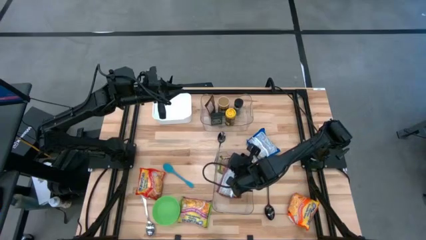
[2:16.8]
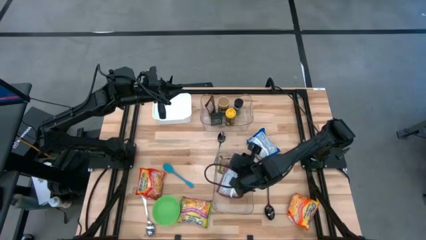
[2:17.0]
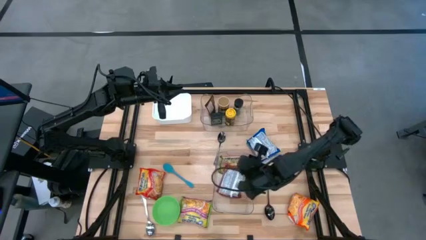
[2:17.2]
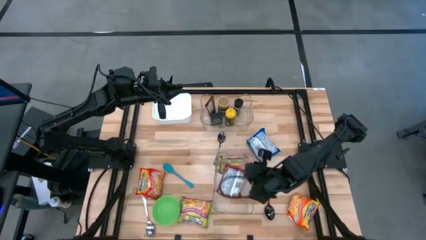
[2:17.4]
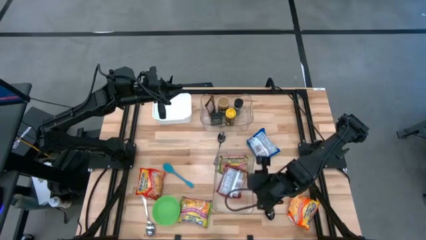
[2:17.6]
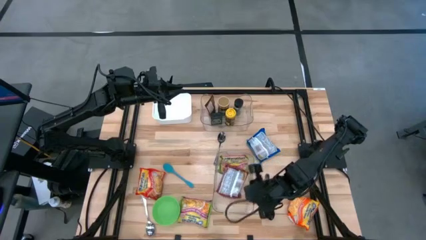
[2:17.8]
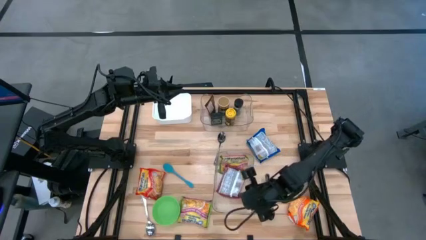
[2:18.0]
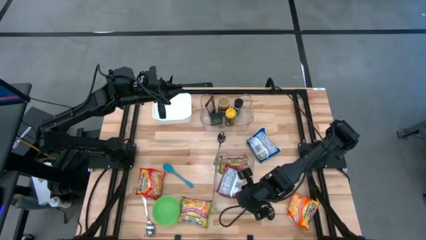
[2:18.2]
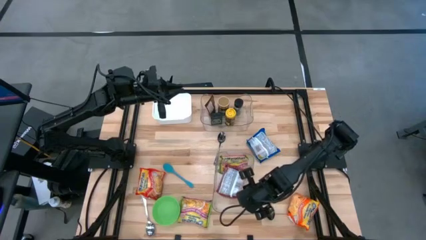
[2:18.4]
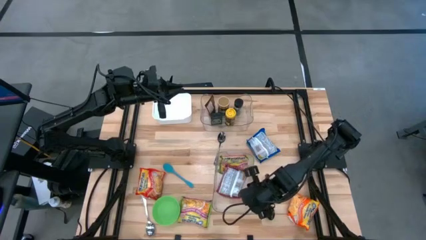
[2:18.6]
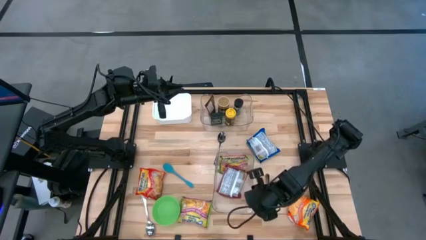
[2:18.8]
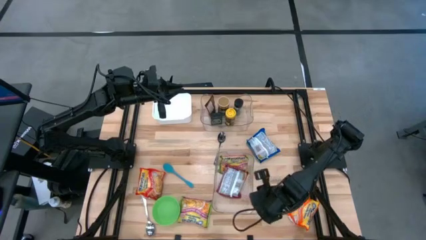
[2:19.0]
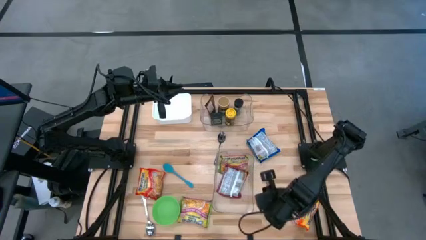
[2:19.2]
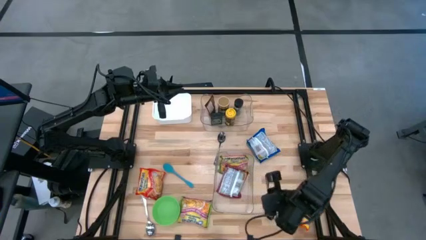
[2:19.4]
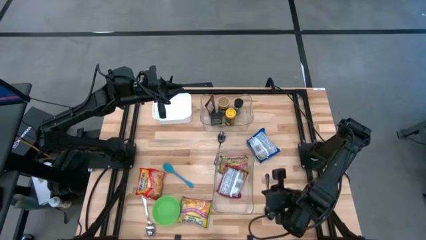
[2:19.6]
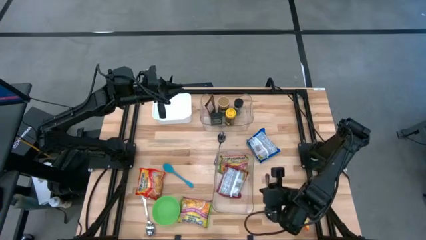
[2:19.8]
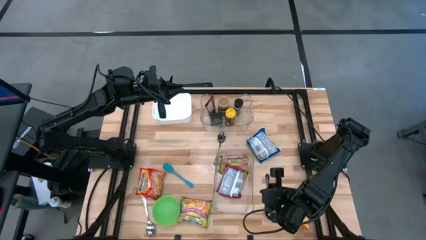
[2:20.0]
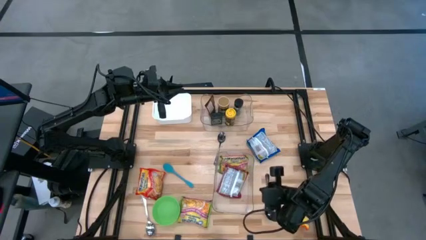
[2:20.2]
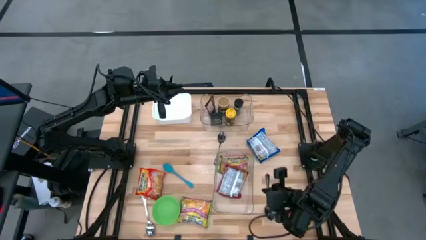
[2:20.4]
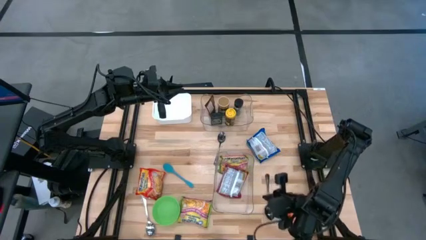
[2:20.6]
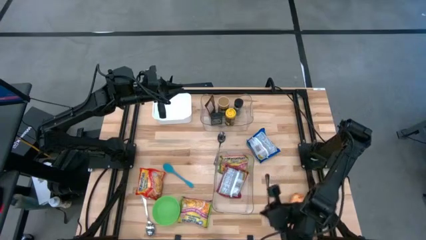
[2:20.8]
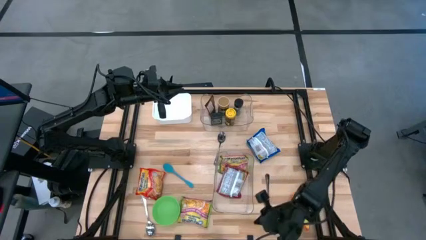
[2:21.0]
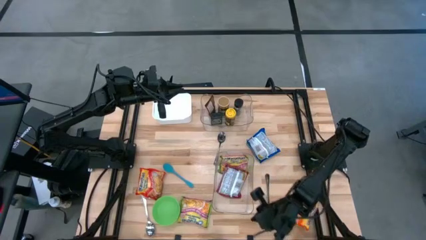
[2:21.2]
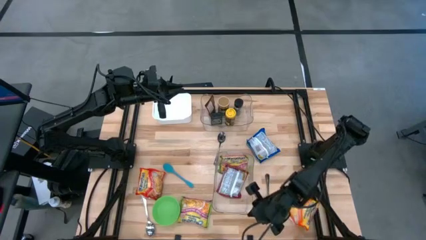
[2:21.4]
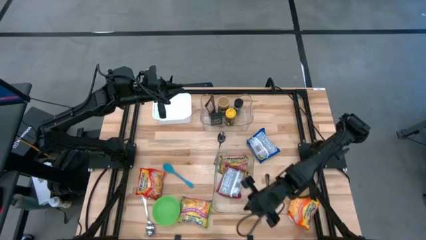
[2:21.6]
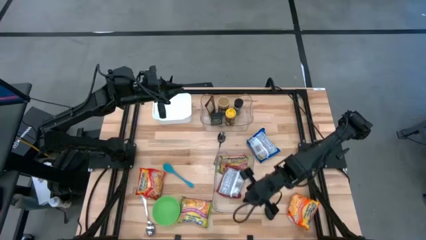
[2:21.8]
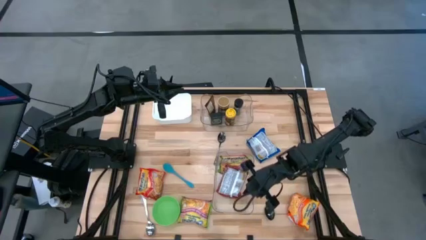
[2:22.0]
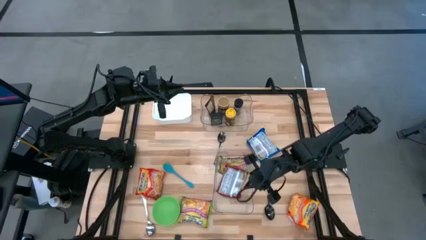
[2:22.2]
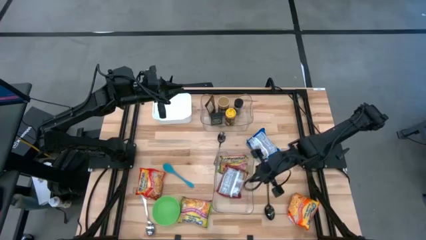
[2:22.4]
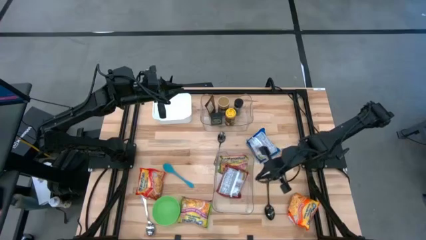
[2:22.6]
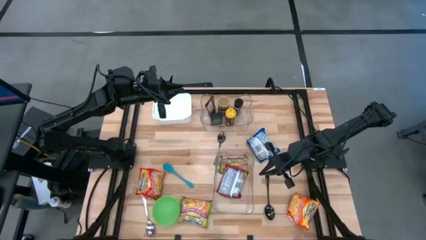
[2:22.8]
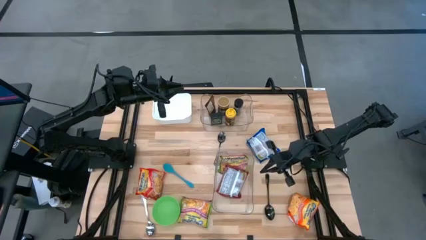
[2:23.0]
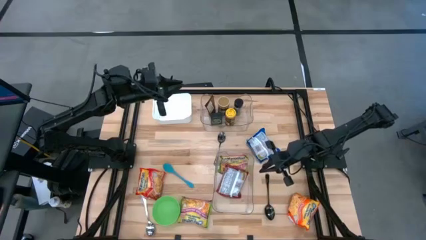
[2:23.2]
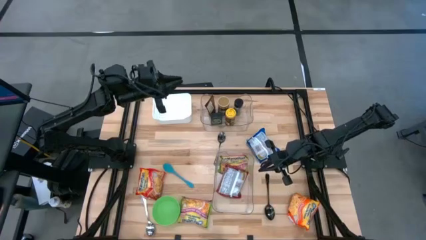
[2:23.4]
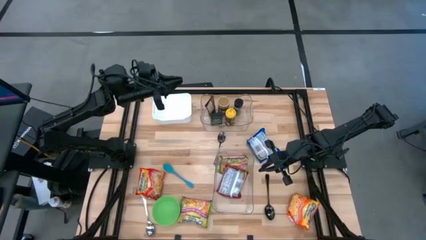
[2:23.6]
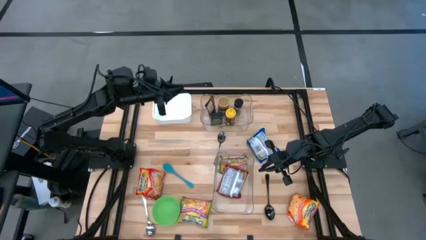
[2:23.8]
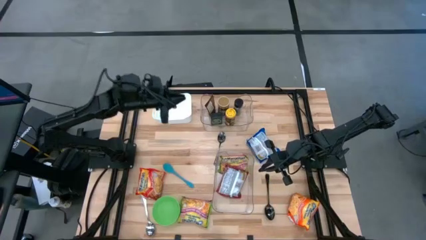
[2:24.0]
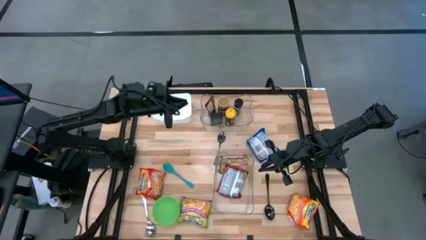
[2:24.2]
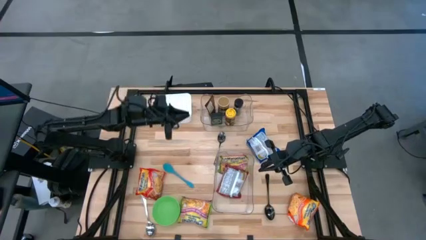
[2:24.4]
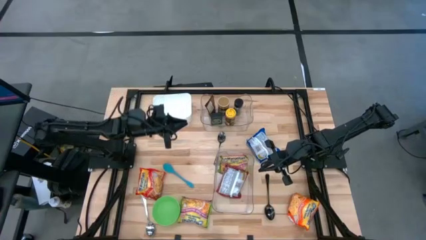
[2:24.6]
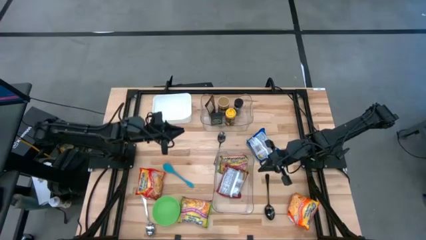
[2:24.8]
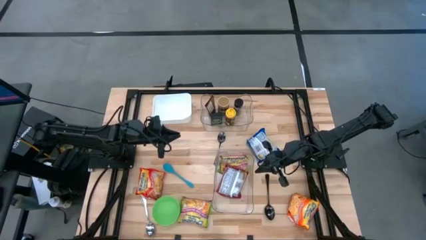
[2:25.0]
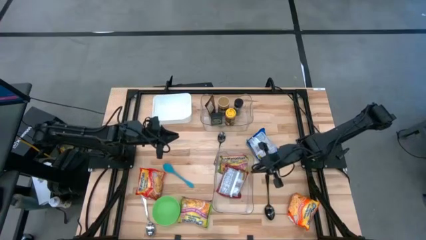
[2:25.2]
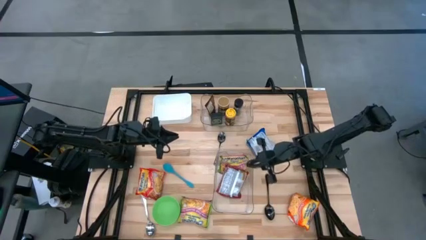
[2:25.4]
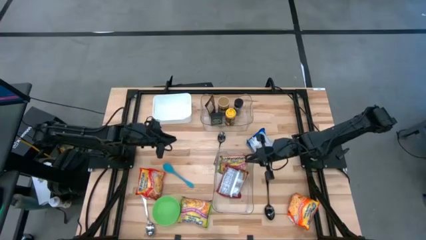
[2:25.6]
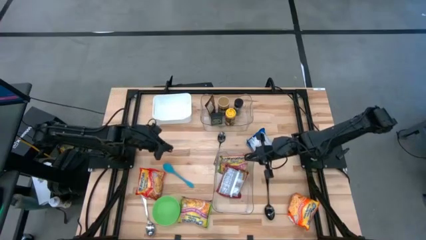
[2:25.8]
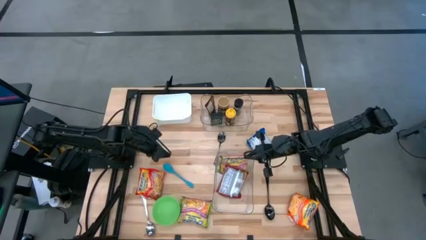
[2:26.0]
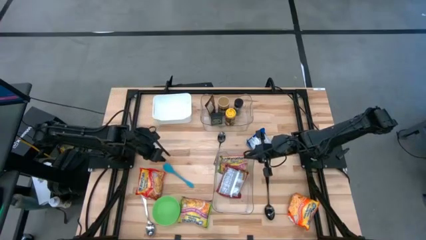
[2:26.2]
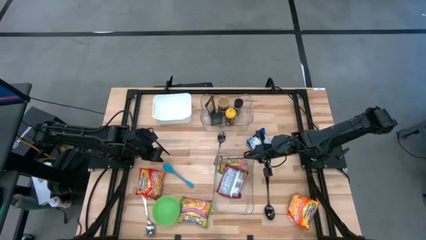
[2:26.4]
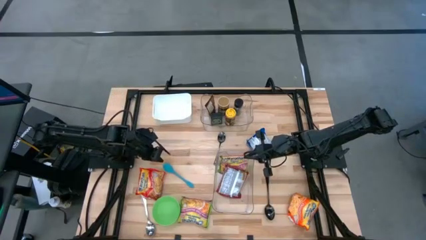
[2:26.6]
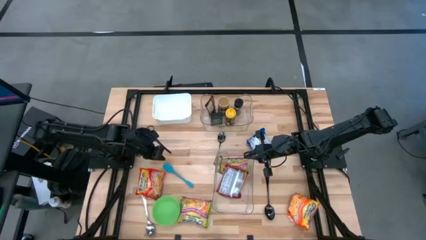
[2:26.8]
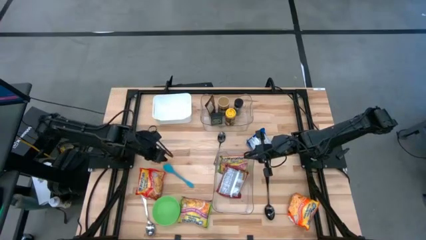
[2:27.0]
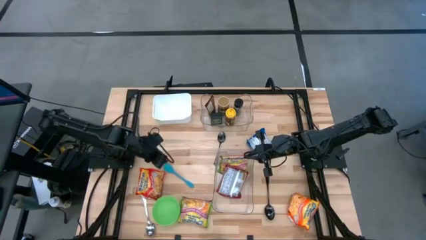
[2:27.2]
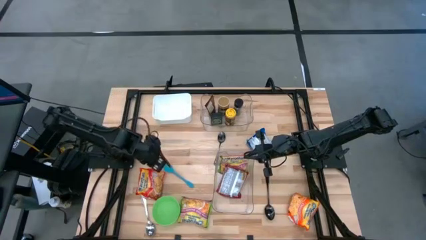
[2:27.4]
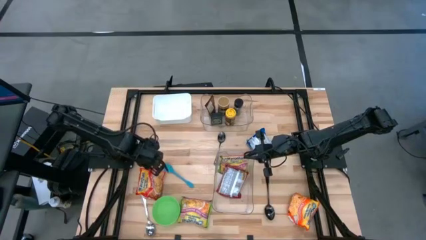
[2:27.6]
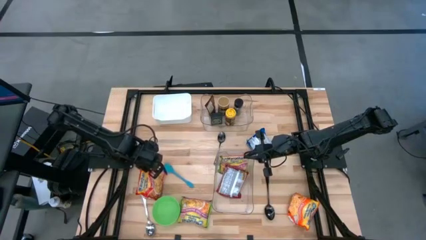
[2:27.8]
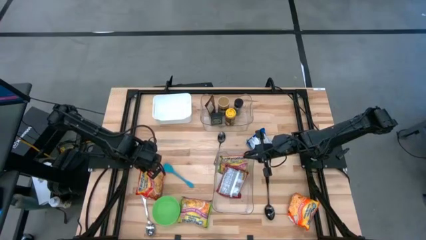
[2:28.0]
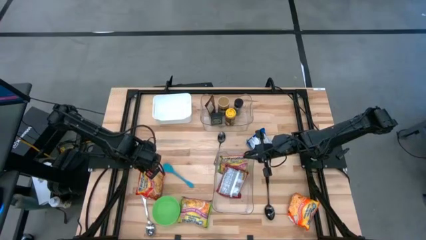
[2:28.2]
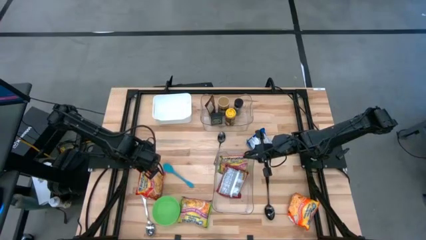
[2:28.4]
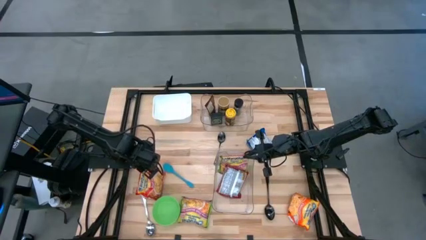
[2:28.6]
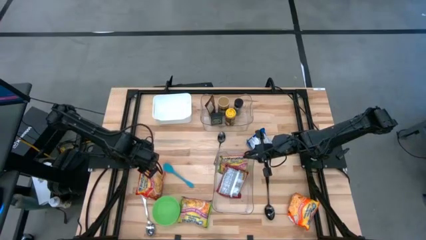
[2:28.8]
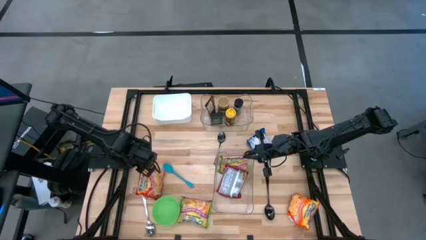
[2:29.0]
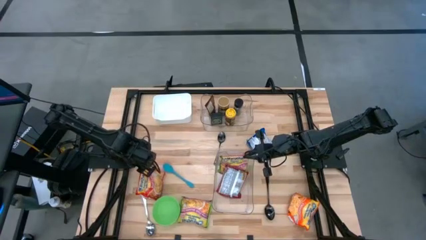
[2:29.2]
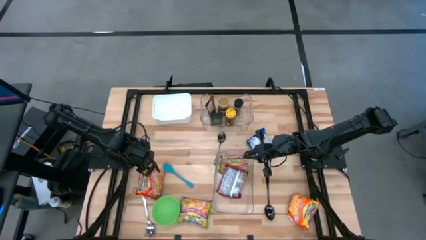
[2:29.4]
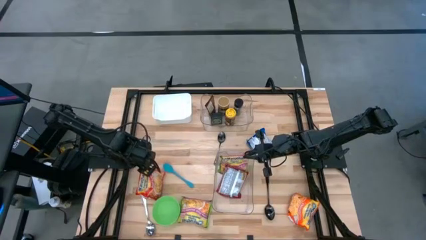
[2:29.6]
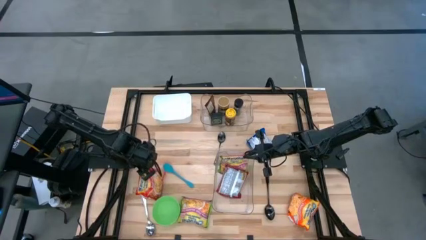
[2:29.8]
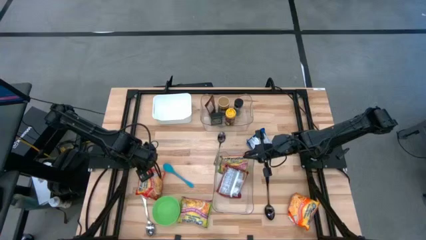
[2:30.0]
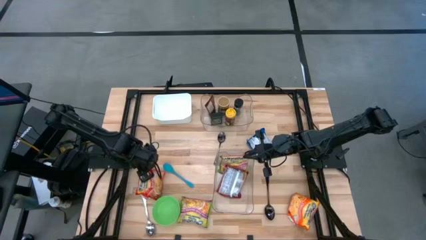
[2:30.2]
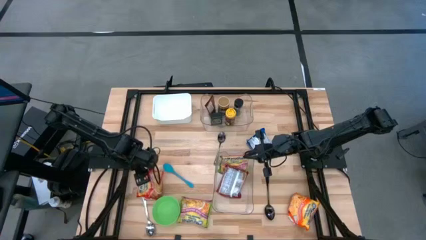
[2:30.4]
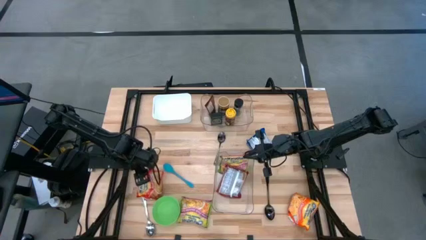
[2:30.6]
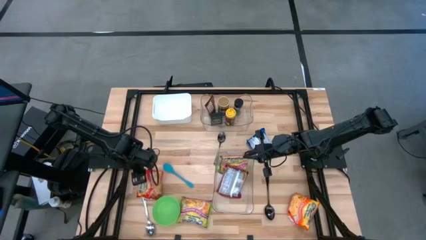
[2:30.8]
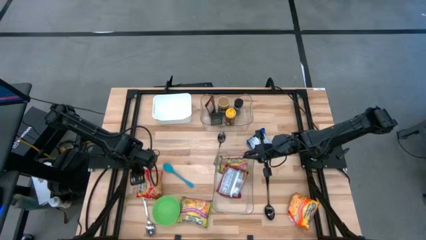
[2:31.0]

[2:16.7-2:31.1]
Task: Pick & Place Food Item
Put the left orange noodle pack into the bottom transparent bin
